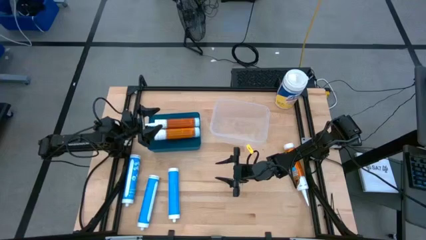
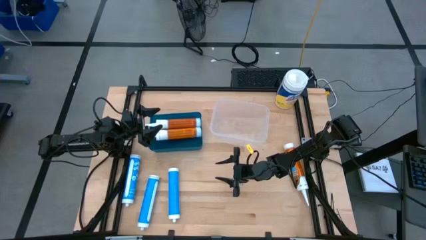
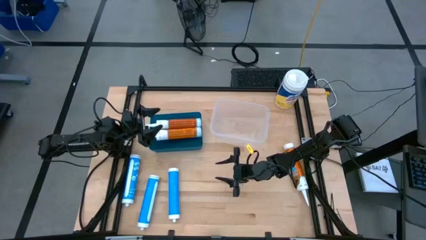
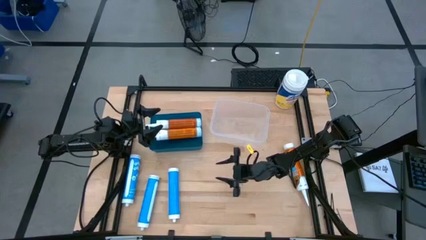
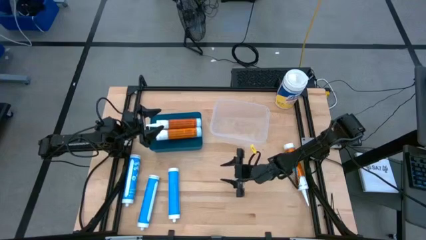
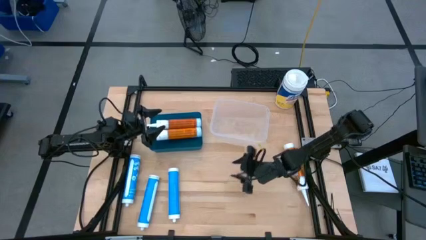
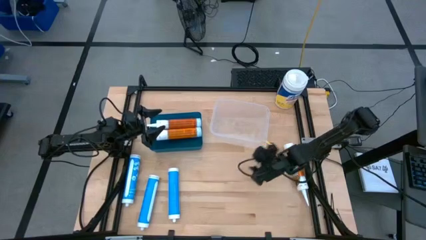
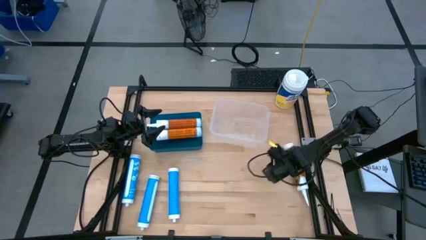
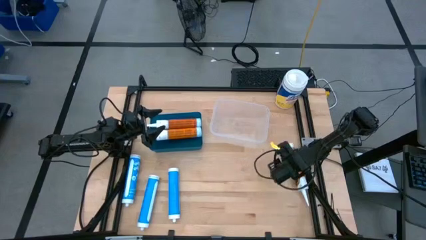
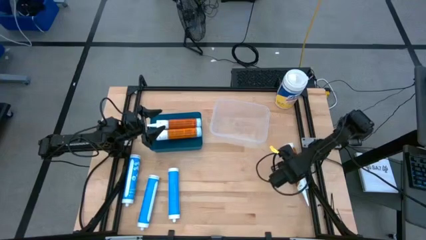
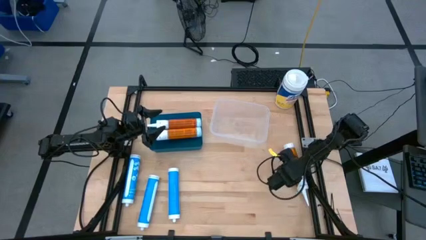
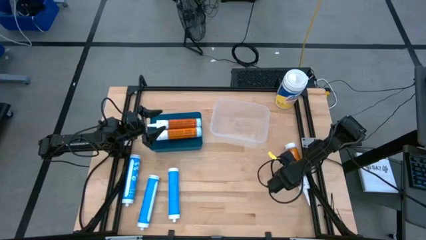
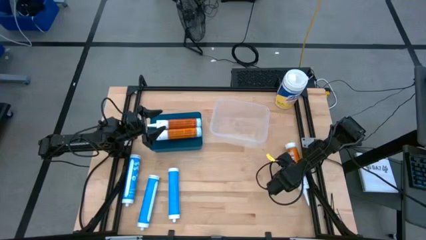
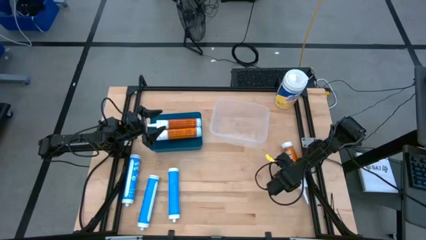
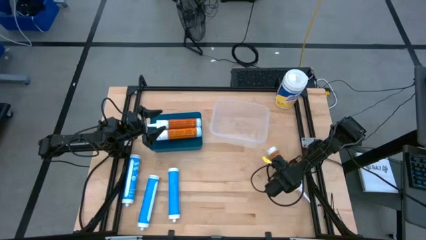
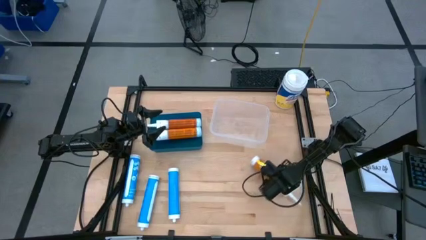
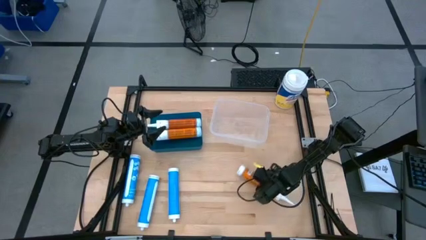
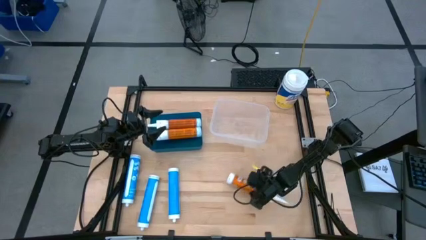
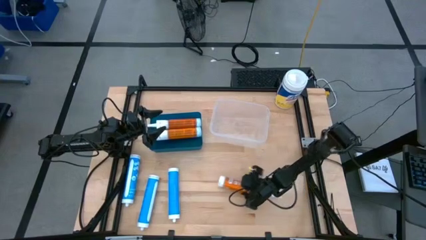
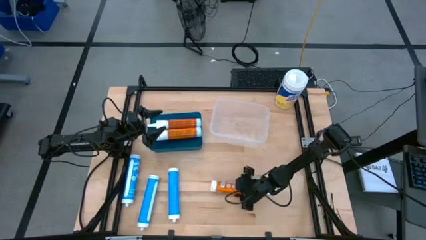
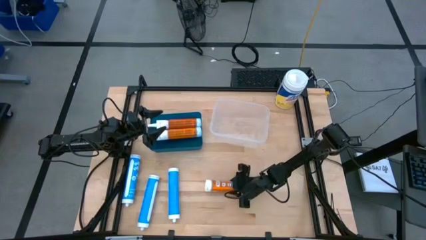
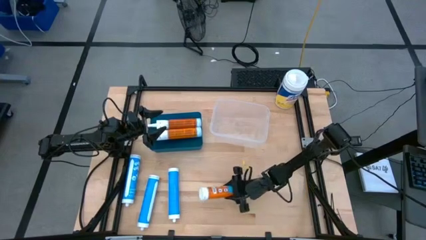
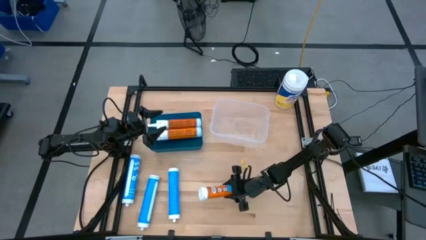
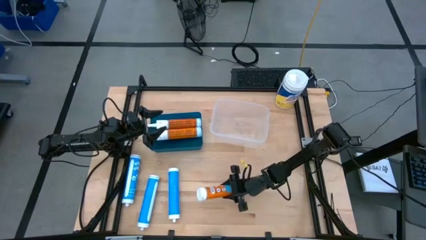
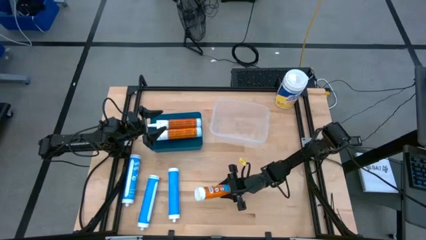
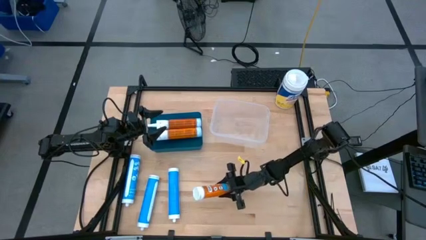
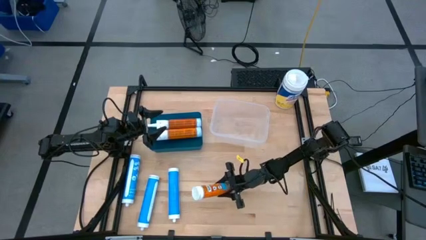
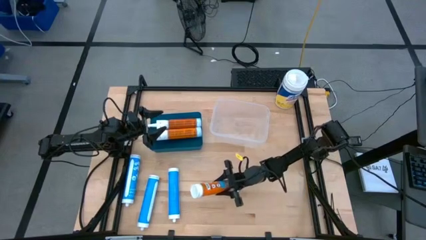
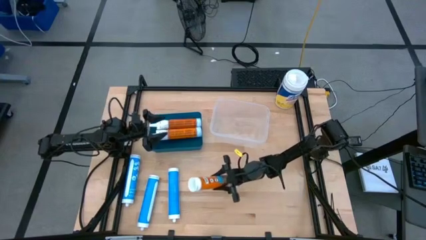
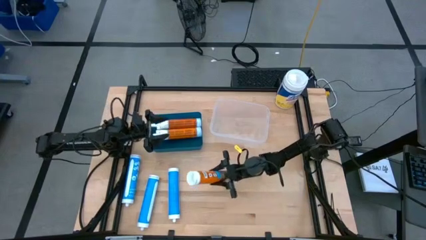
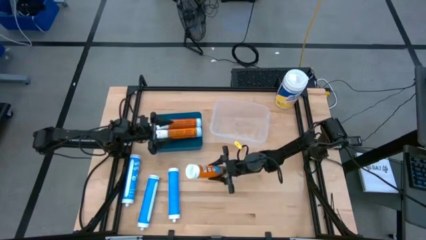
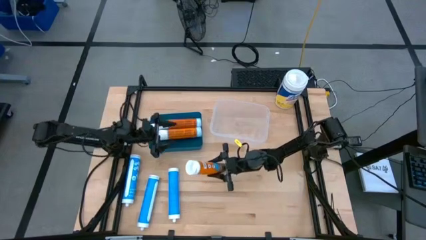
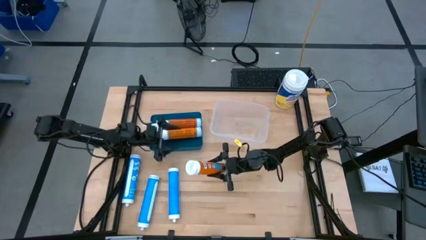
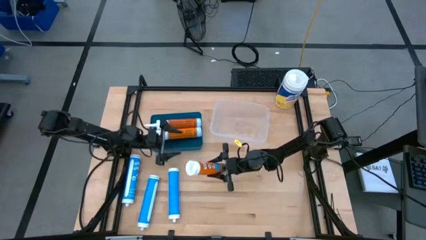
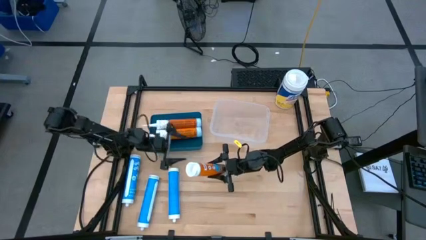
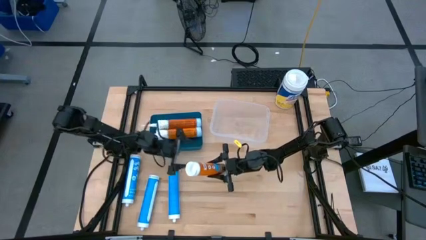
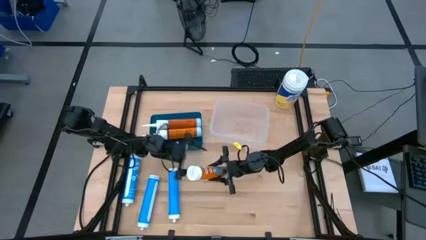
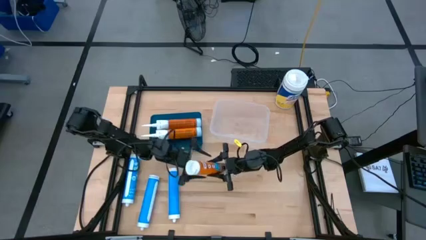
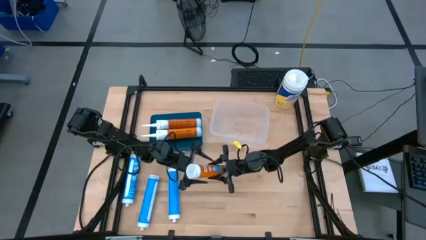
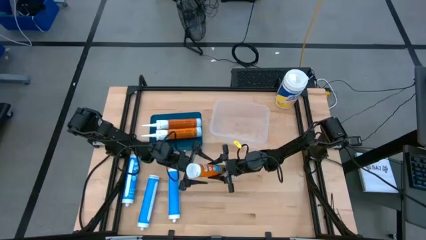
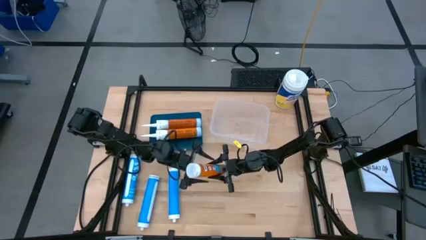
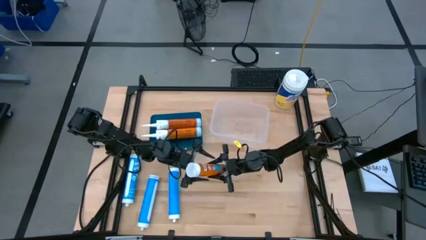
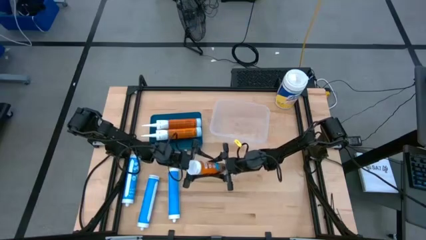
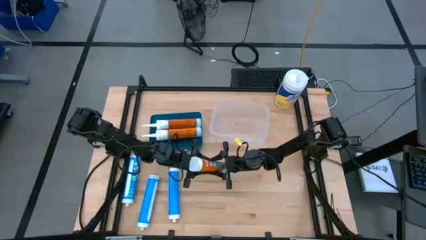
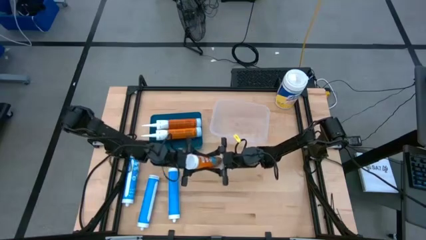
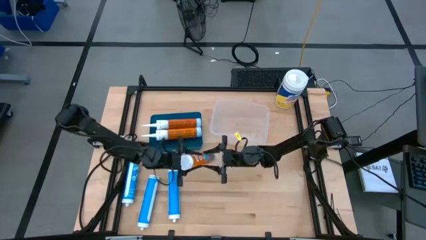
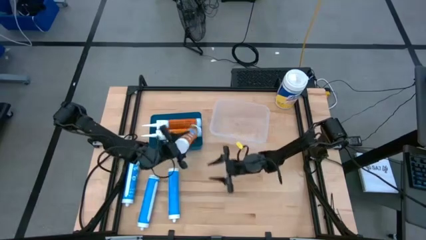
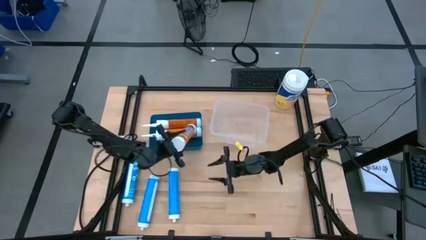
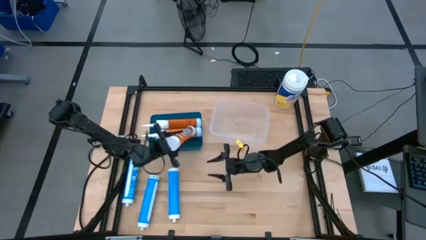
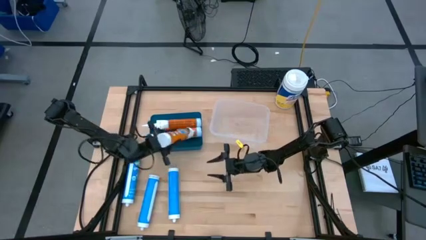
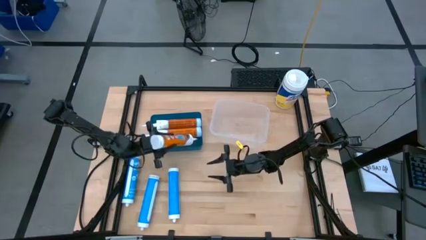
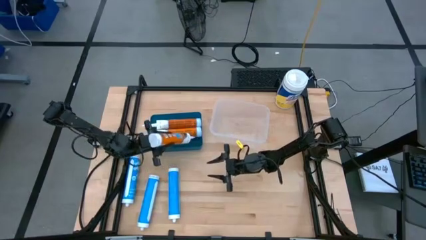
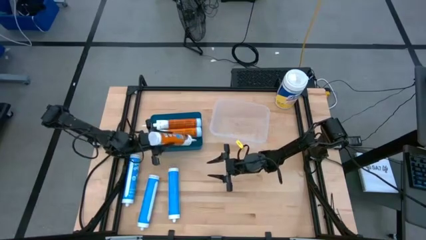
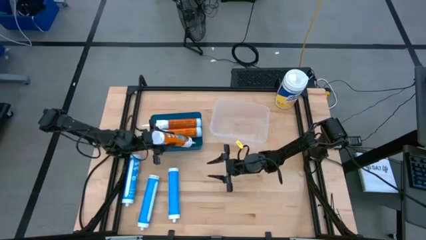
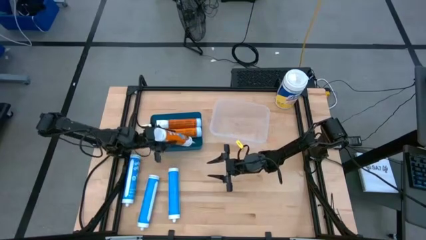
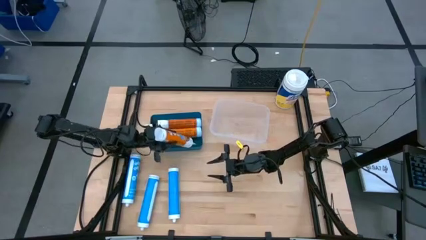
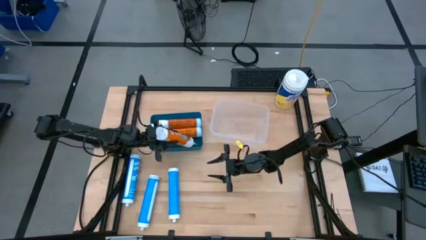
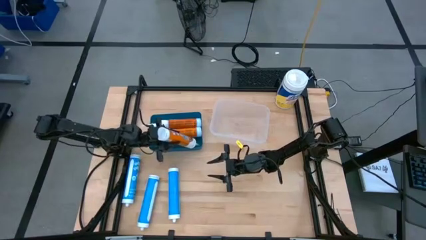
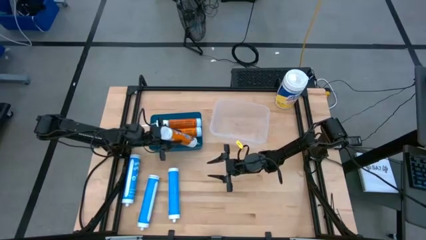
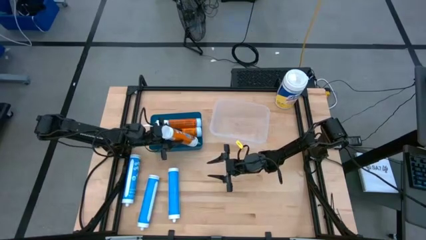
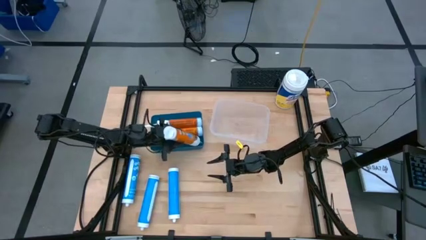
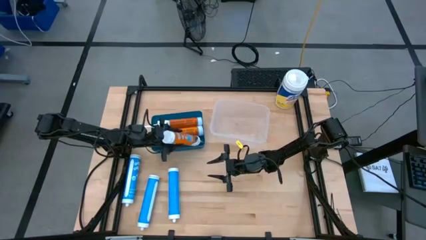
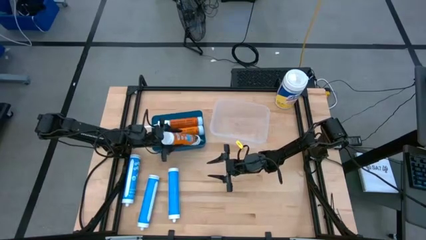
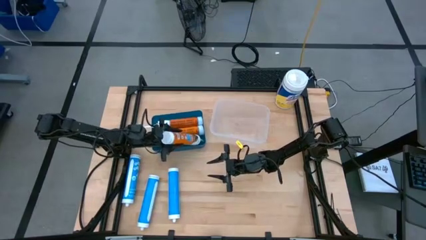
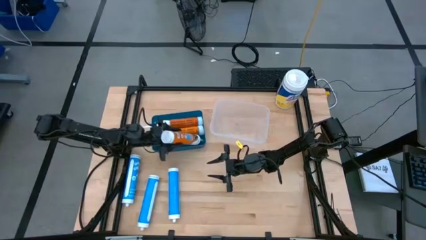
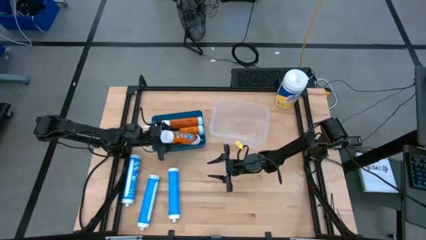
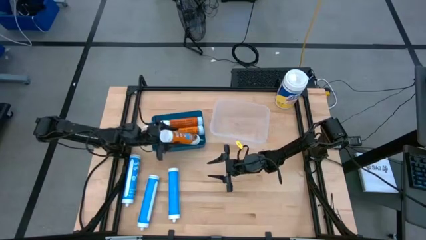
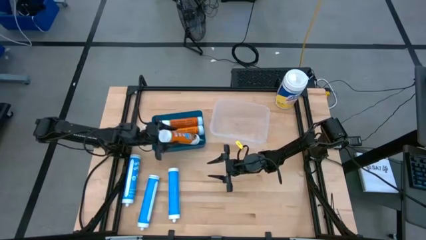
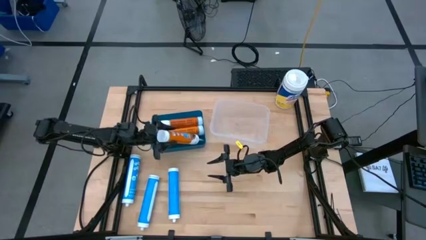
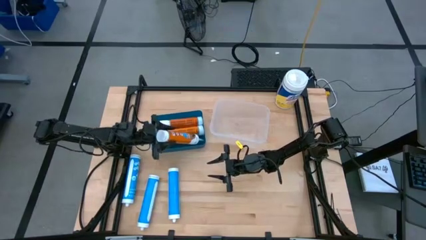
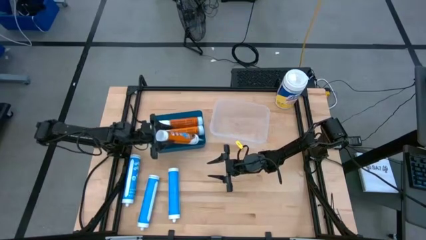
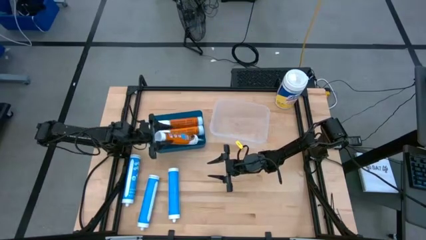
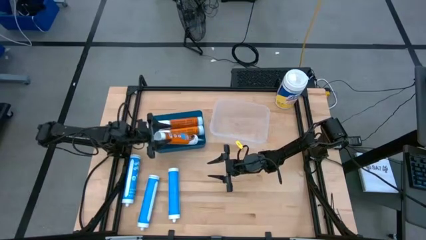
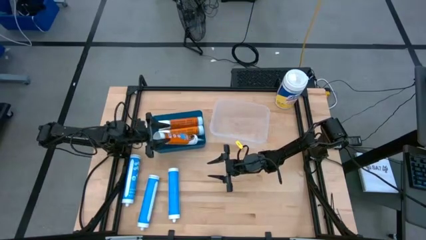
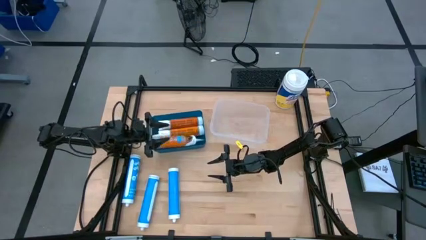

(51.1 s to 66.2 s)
Task: Pick & place silicon tubes, Sealant and Lysol wipes
Put the orange sealant into the transparent bin
